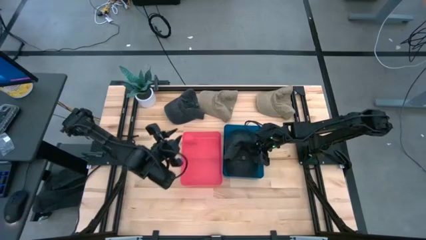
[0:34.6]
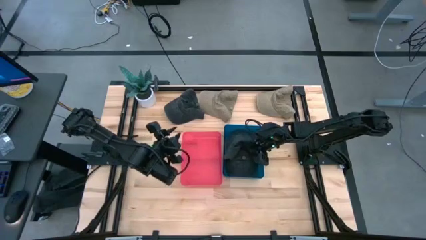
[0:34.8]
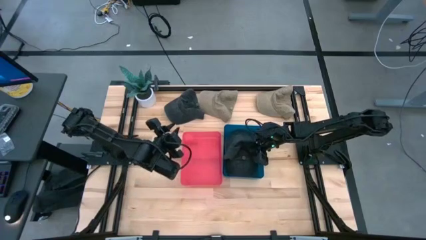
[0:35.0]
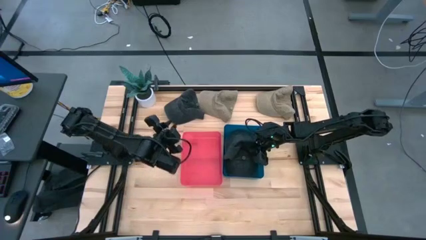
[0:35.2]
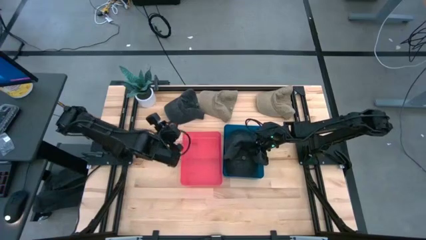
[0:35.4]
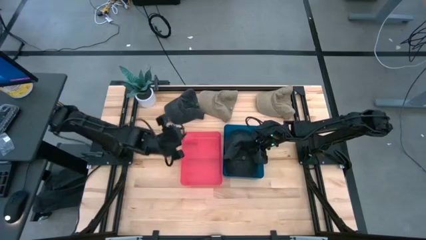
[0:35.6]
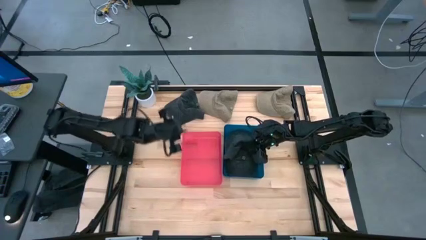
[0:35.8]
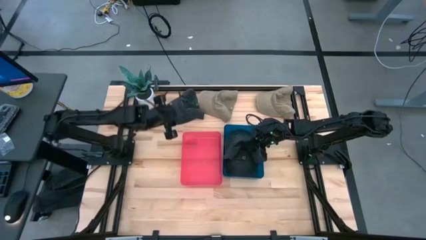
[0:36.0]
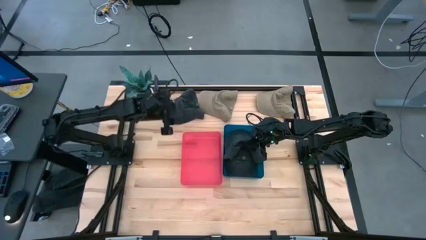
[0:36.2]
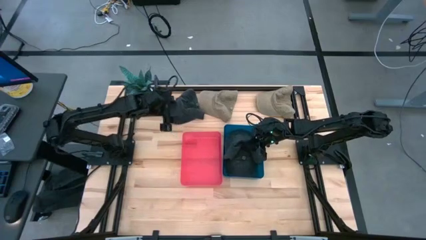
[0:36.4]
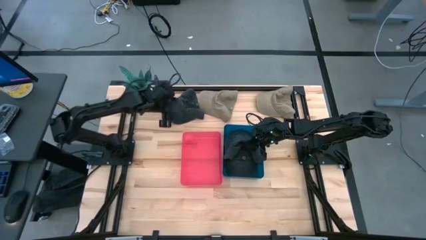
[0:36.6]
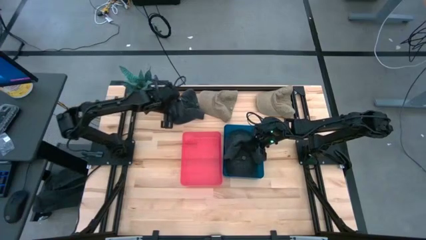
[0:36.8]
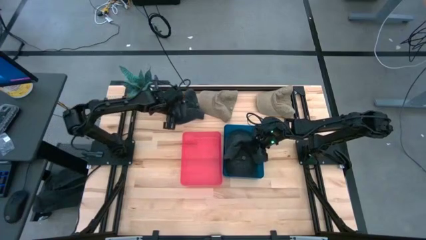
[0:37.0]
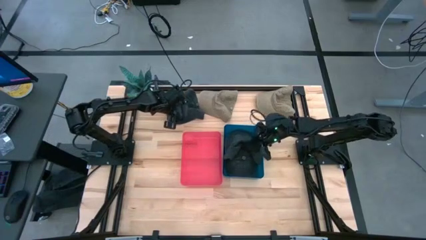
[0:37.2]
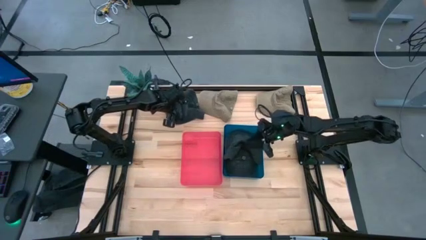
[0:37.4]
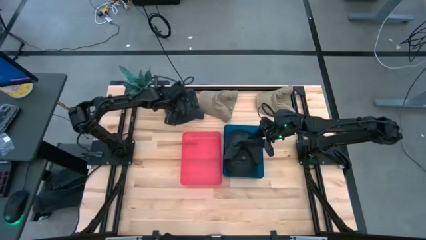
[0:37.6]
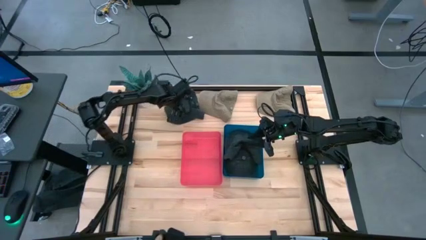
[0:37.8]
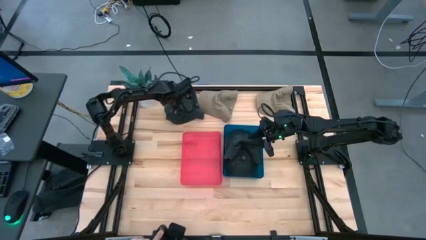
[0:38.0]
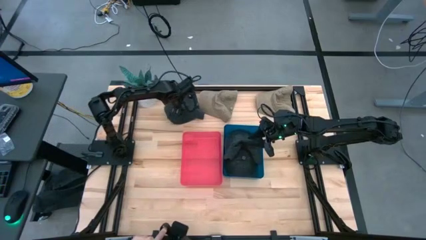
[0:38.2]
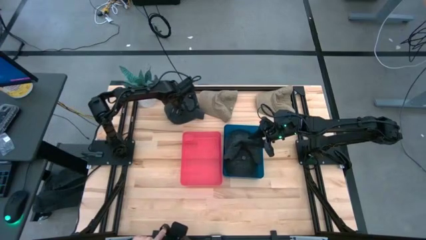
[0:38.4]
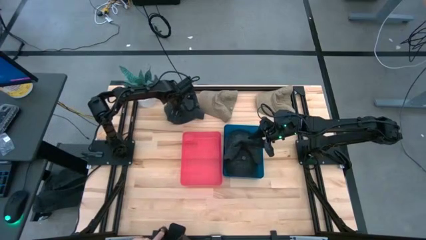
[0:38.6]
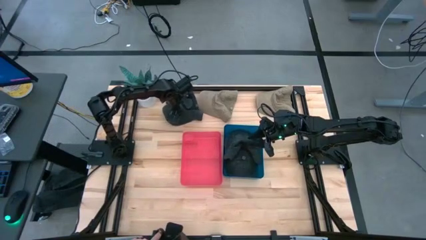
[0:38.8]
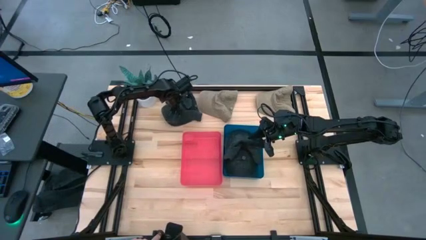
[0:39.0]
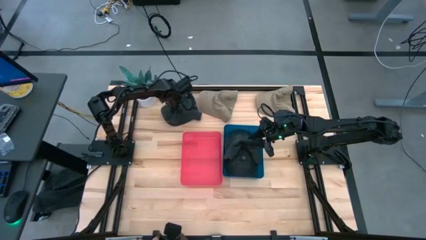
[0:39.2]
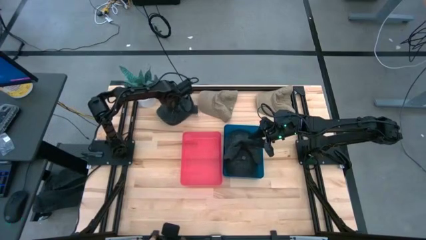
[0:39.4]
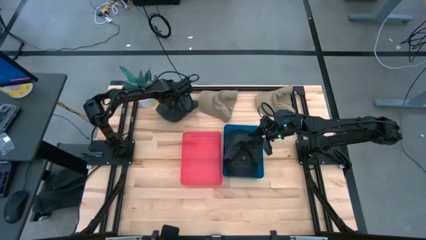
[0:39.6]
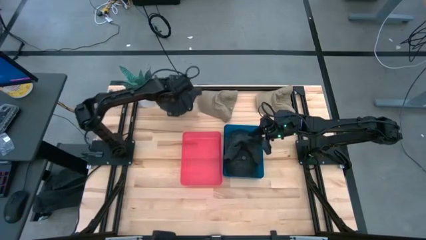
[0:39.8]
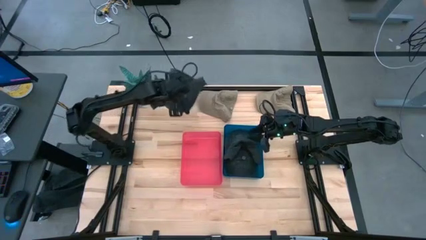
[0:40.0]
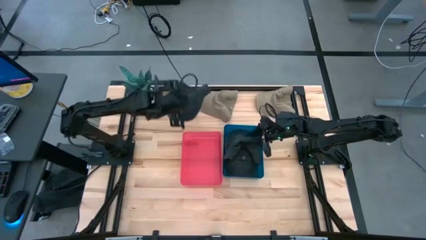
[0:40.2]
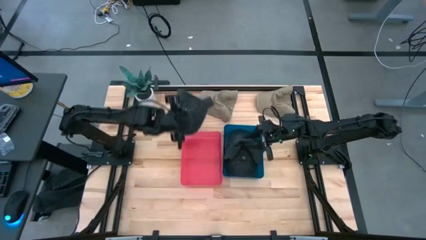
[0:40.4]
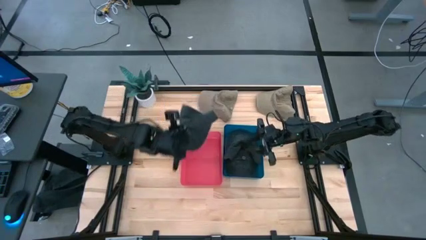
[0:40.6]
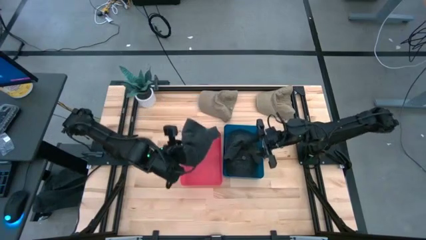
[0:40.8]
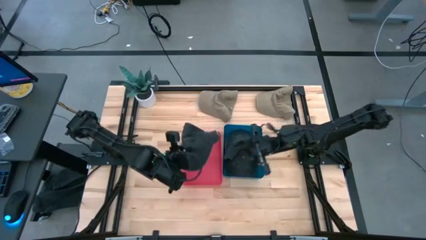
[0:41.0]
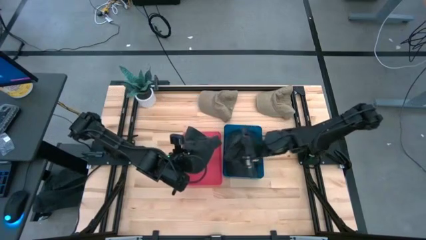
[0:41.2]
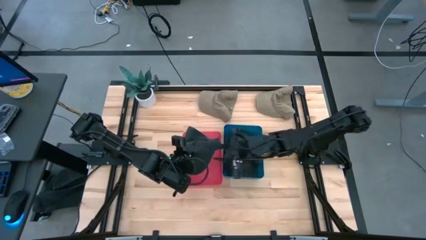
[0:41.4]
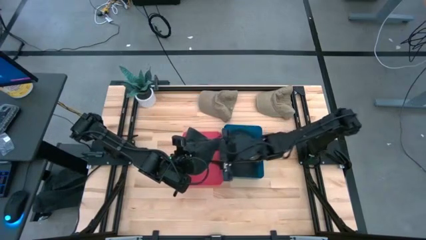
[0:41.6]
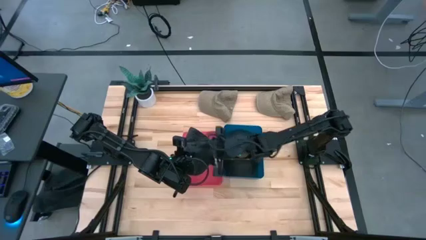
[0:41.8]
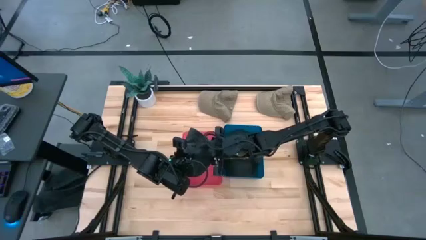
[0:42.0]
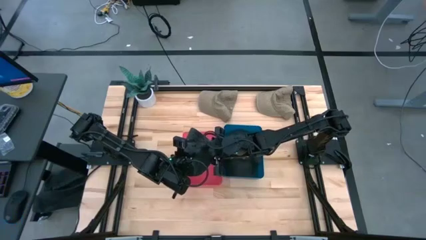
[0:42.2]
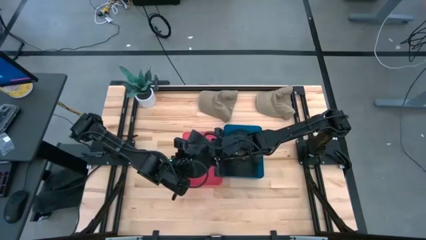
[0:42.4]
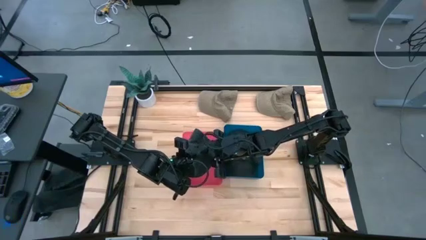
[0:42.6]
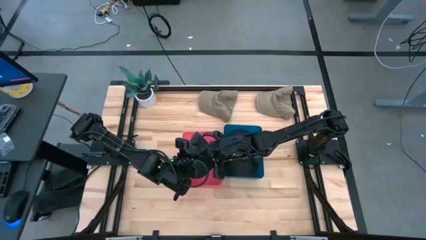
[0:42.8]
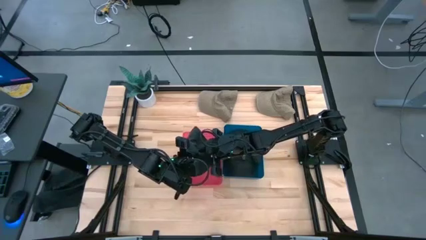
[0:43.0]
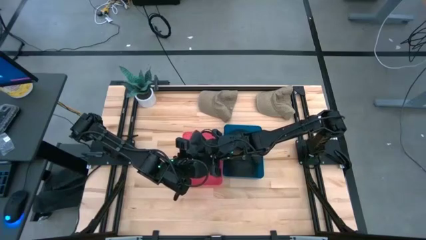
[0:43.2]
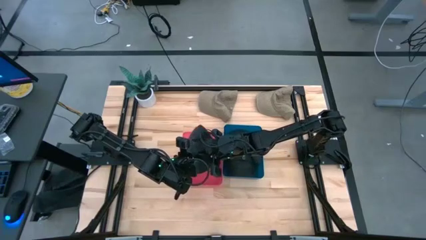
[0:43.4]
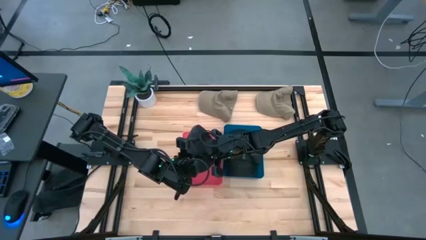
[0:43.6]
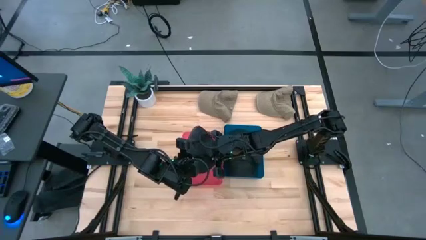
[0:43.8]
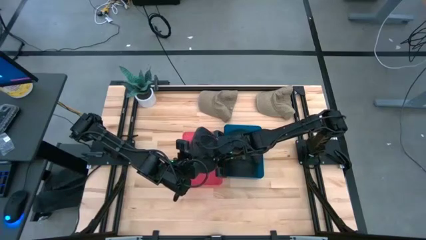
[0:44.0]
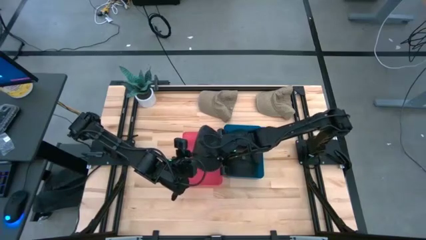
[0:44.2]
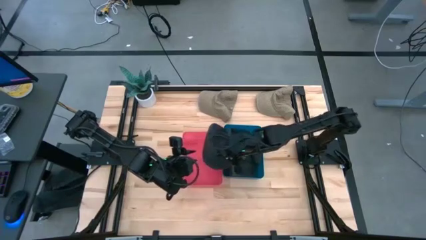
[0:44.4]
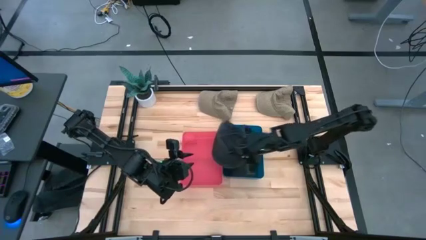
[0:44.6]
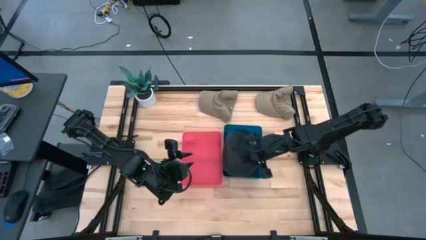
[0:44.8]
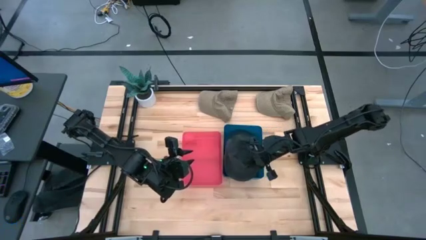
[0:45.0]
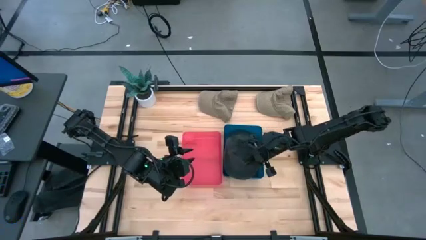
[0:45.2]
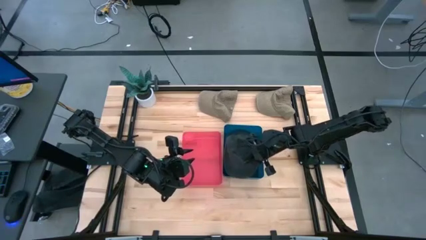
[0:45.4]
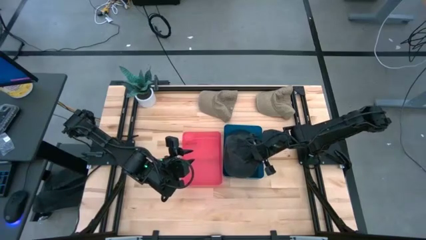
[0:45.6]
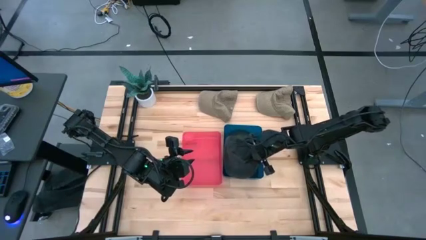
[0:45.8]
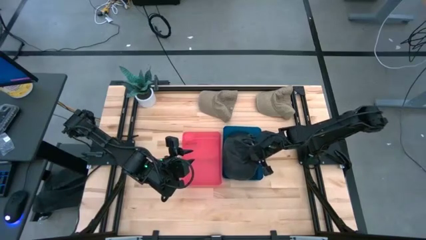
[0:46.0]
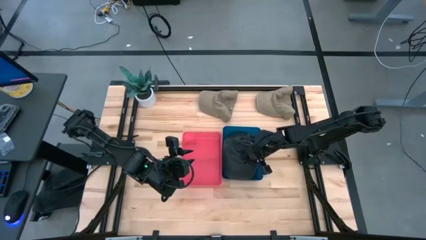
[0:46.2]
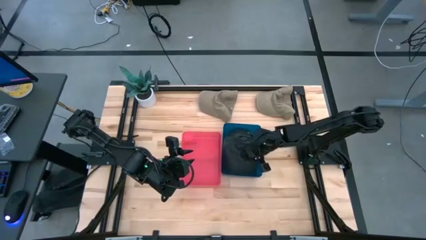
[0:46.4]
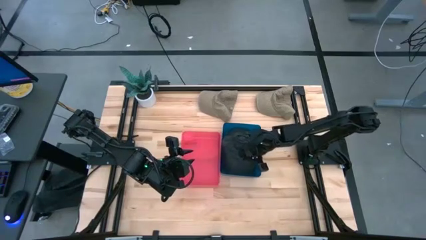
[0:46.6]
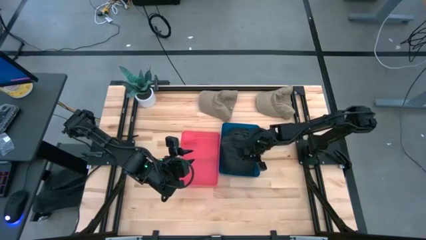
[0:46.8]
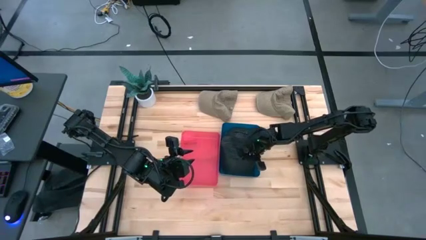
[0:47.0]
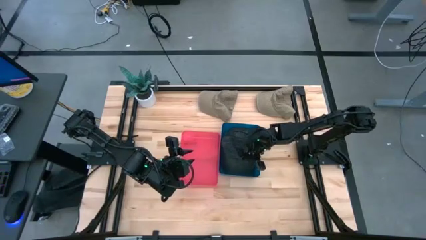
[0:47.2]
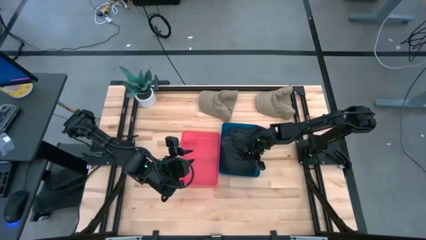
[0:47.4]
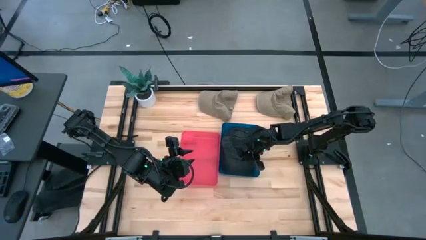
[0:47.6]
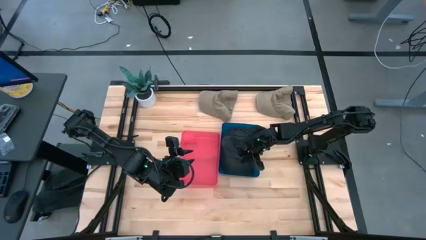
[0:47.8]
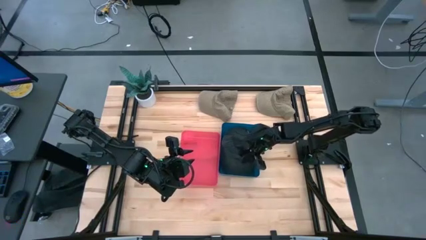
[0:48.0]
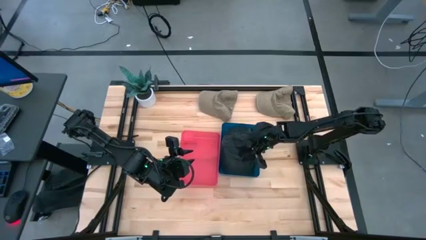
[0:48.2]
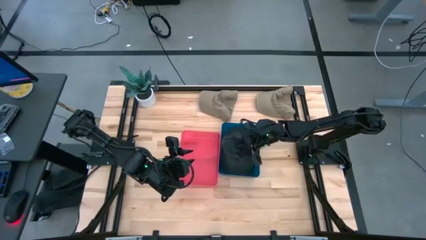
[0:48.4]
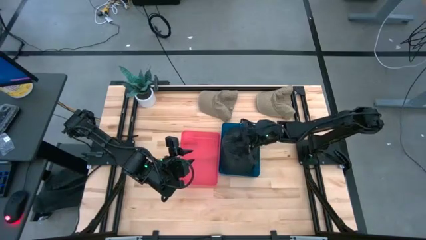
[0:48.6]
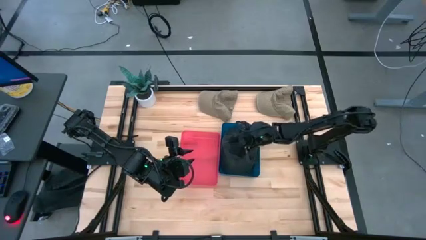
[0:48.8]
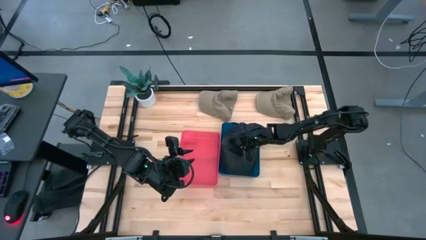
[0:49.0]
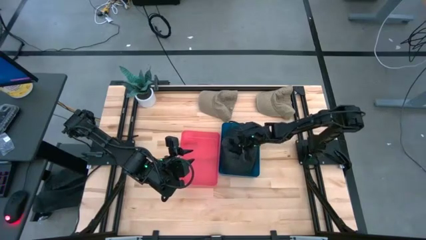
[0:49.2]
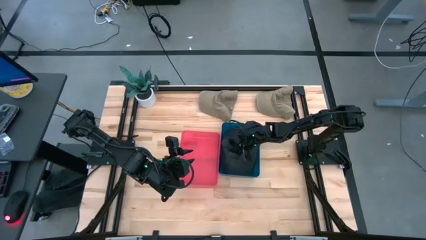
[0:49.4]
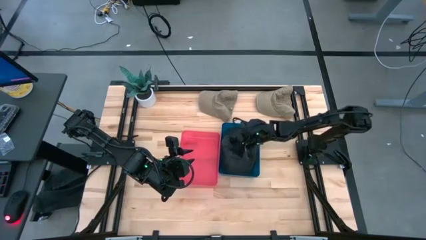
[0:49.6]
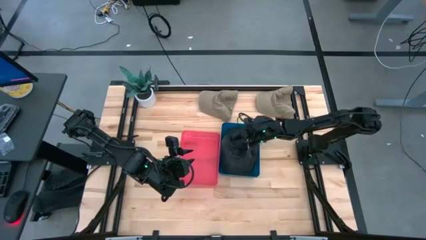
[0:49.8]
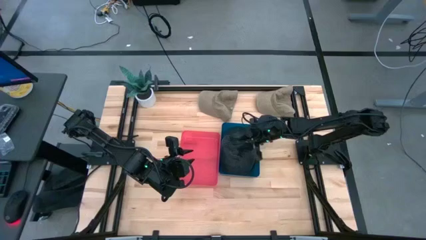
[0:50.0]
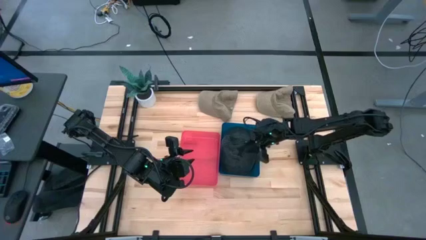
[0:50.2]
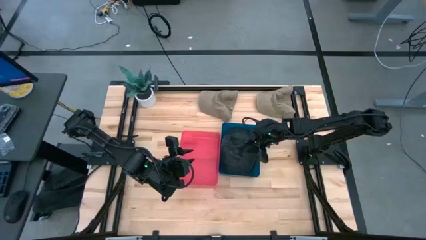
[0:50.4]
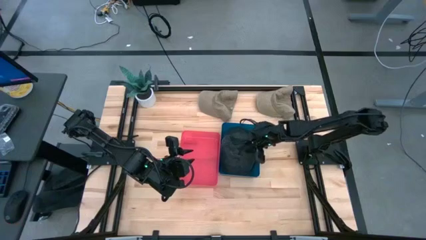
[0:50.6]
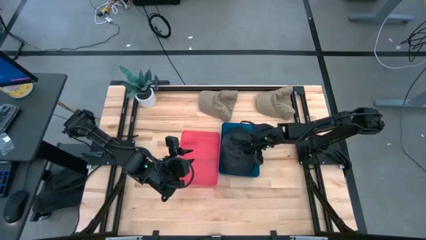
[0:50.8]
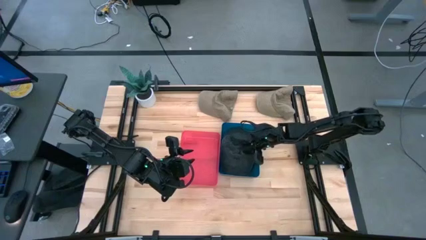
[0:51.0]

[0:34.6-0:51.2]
Task: Pick & Place hat
Put the black cap into the blue bin
